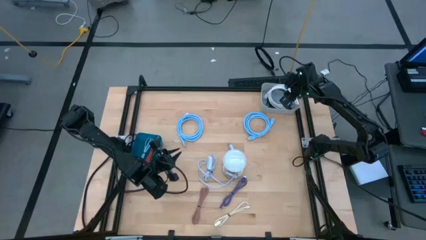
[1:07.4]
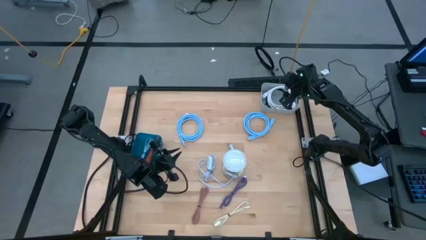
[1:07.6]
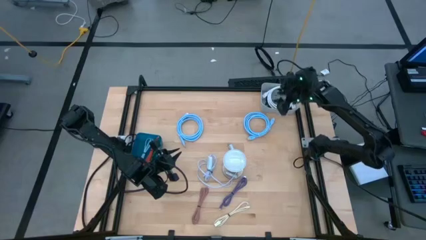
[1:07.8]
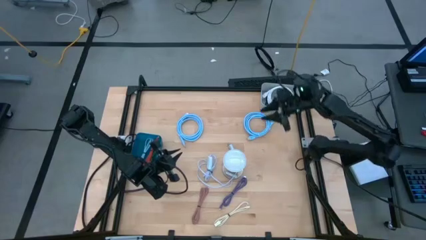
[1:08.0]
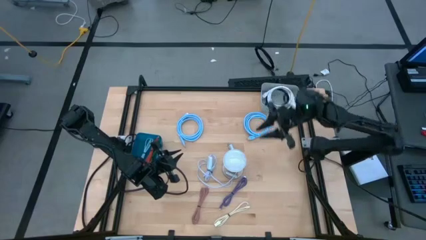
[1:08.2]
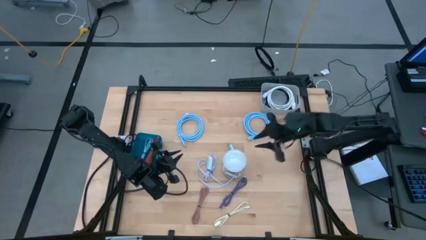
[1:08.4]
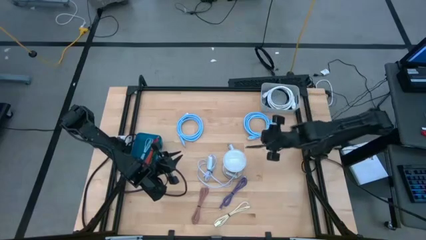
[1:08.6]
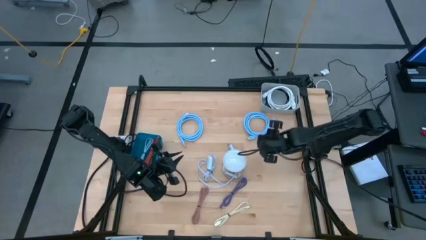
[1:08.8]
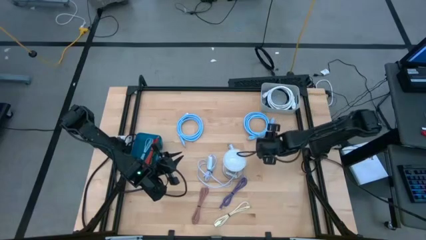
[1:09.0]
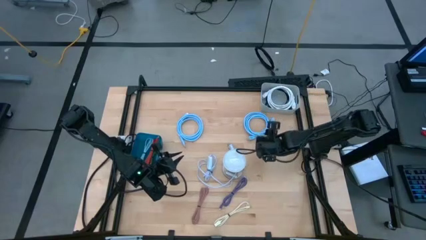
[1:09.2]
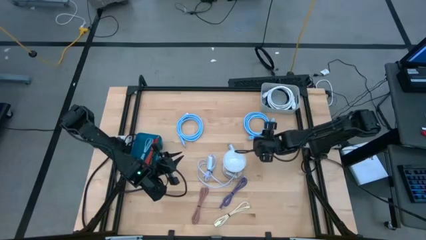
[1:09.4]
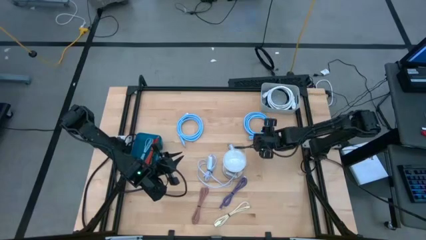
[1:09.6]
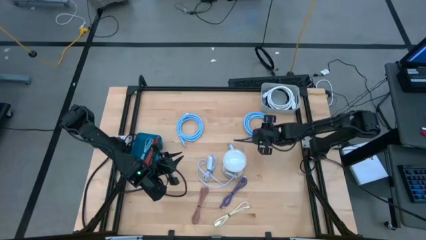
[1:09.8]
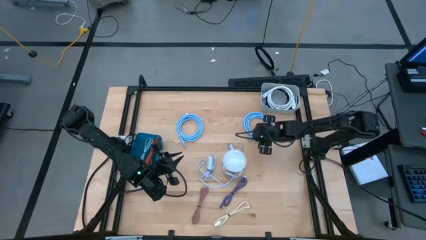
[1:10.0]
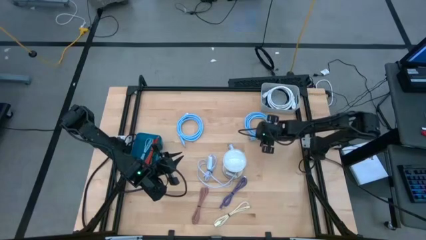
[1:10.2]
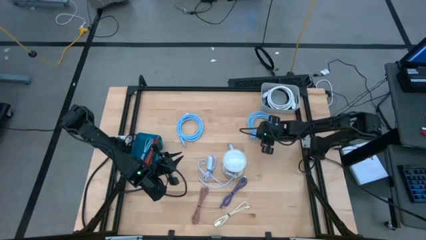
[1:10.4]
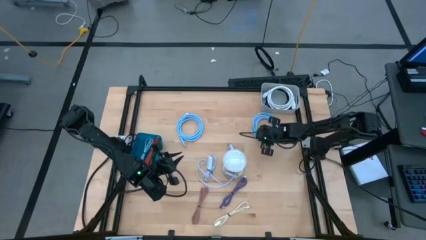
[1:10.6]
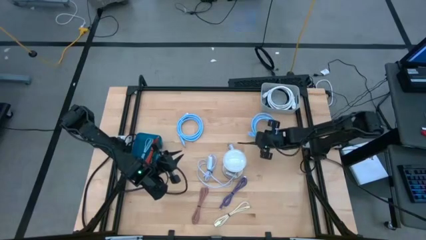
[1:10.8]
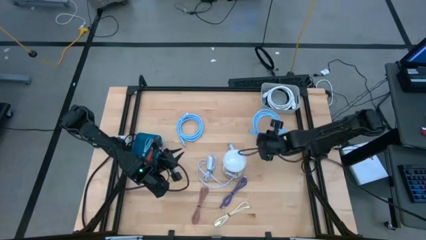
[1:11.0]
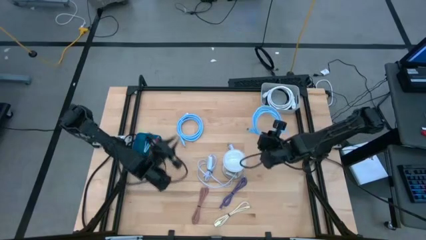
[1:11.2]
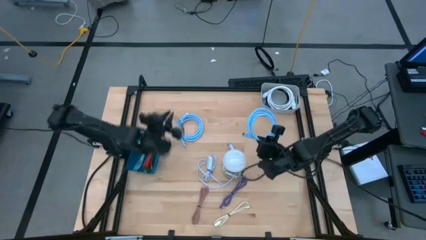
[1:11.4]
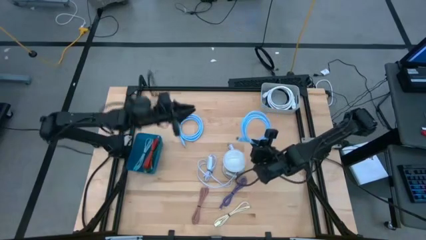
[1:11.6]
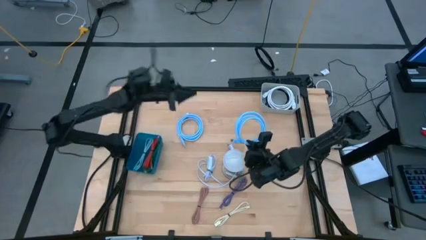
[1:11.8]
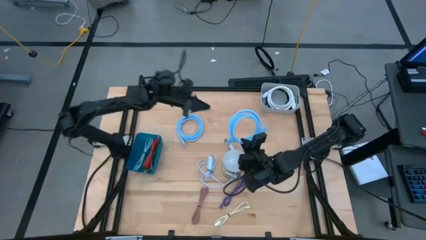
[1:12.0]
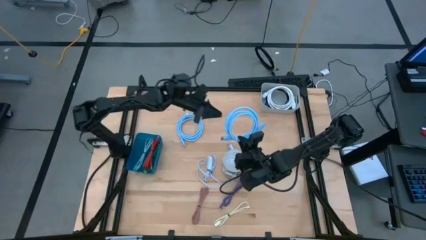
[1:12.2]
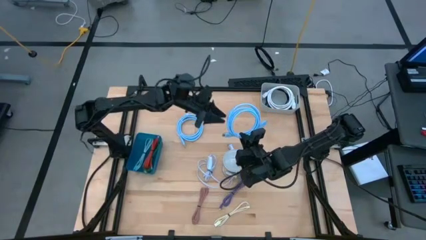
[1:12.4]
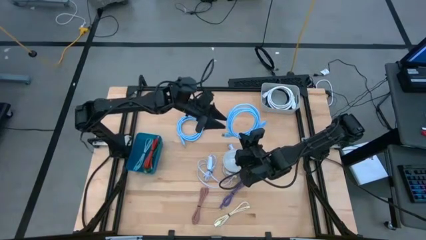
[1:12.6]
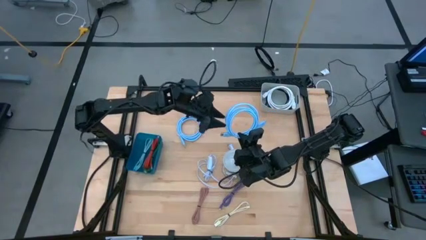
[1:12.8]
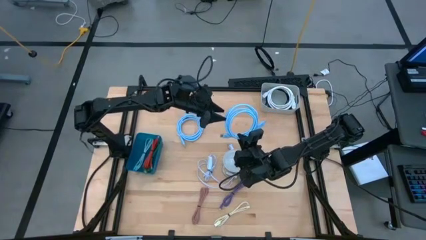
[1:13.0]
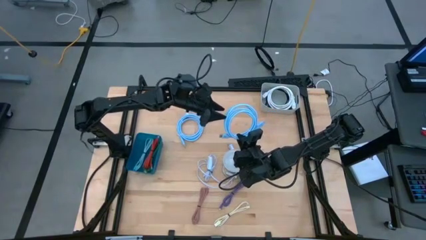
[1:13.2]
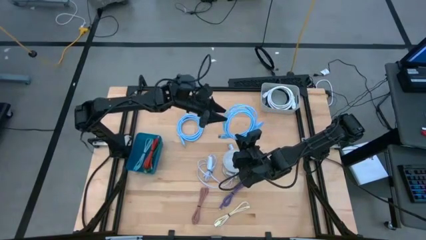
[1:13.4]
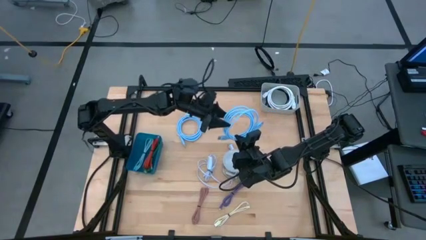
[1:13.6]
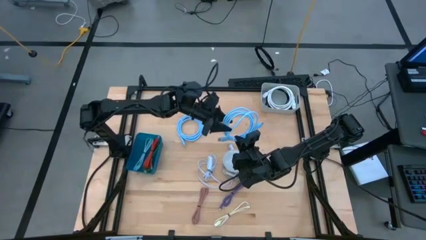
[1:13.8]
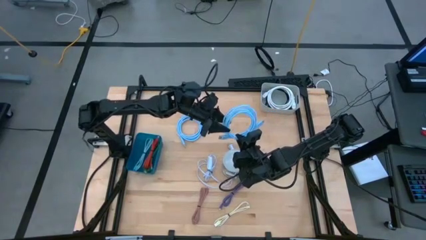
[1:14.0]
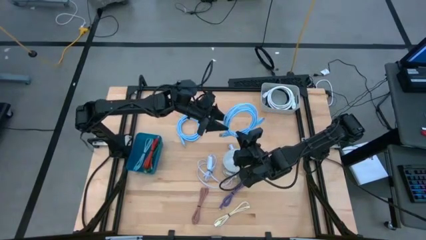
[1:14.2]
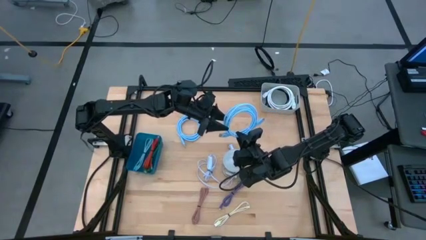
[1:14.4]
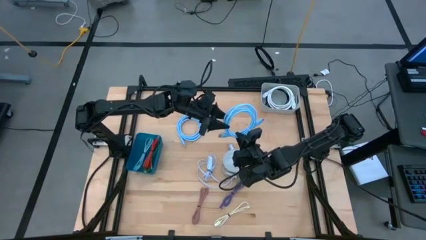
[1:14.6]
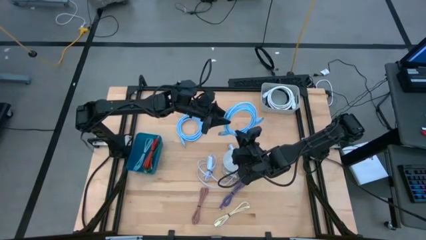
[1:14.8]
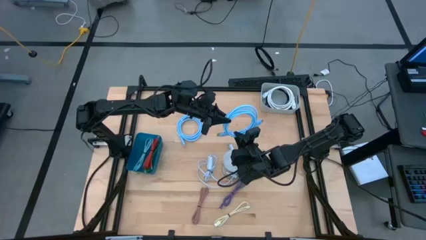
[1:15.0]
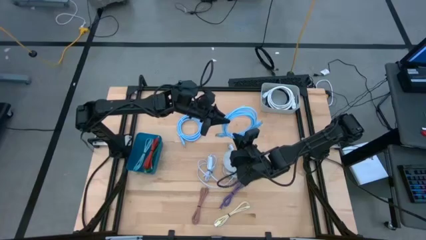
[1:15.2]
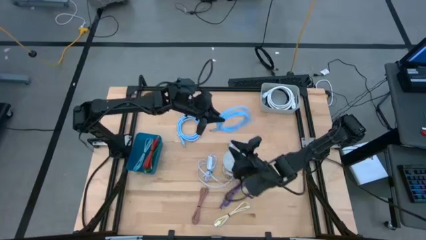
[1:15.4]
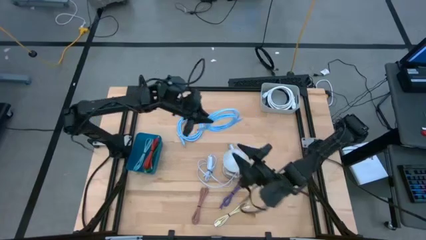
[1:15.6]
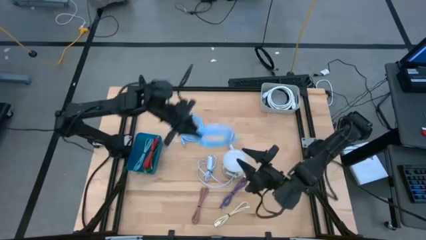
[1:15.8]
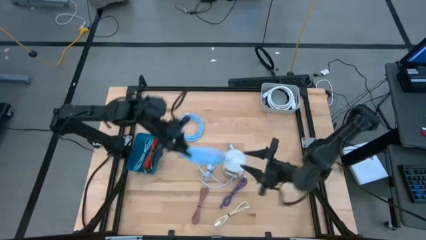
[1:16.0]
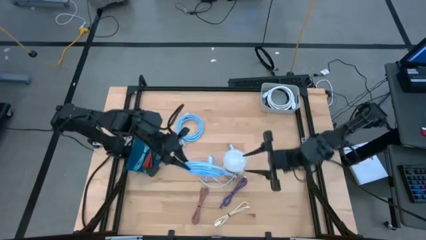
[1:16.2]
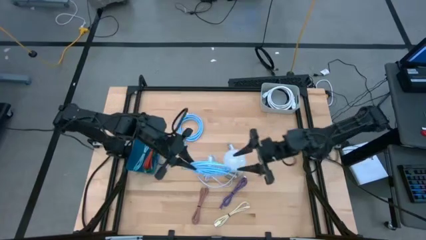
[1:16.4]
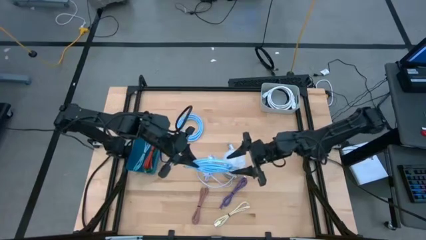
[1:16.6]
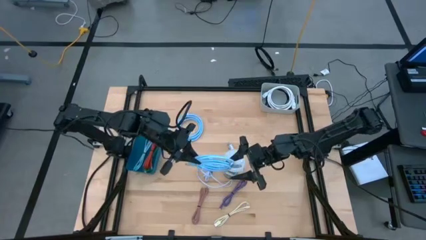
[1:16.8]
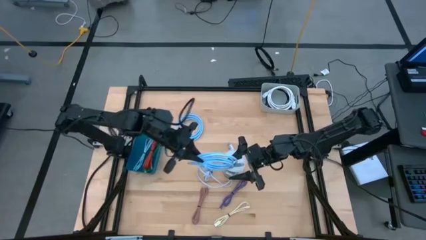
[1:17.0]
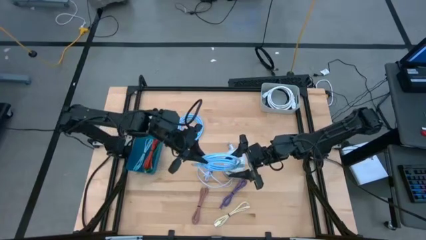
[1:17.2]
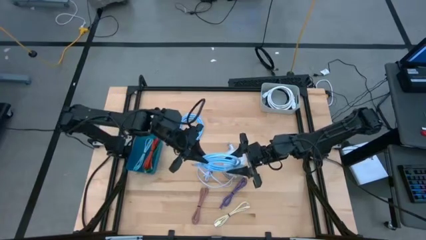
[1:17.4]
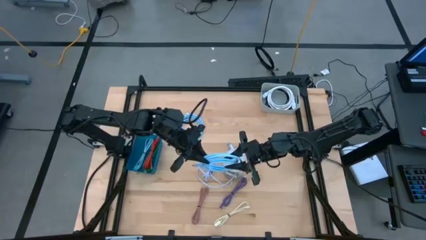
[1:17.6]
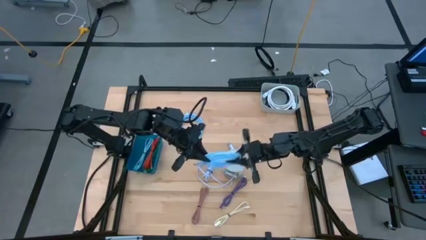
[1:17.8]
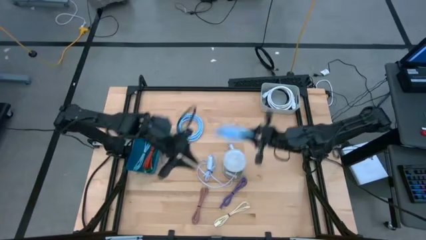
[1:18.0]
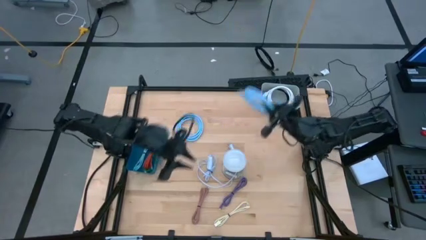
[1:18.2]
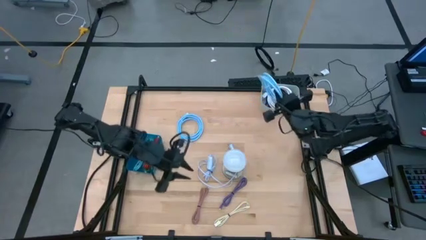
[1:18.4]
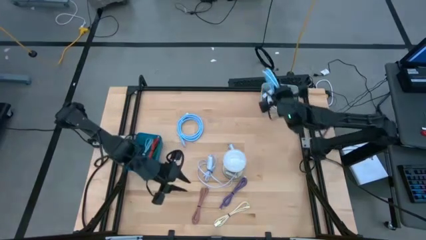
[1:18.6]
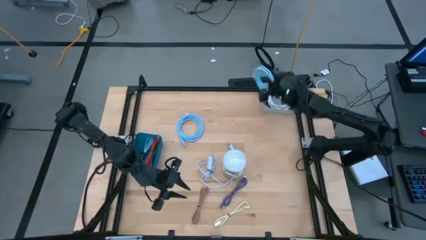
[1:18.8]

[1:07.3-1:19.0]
Task: Pick & Place USB Port
Put the right blue HDMI cable into the gray bin

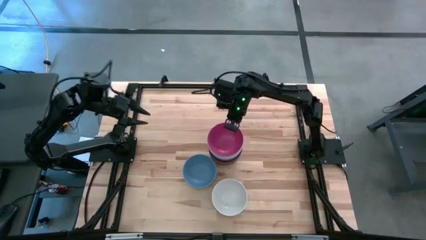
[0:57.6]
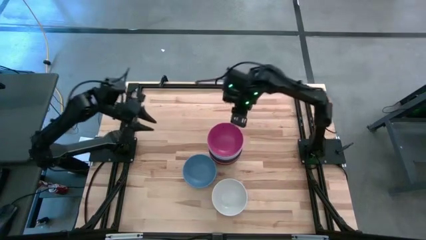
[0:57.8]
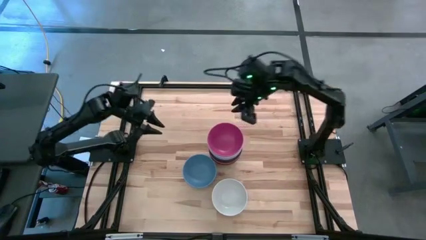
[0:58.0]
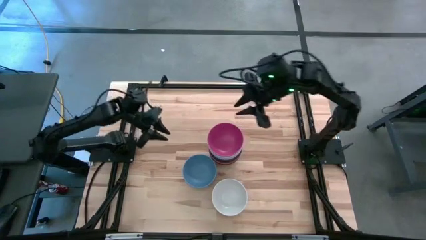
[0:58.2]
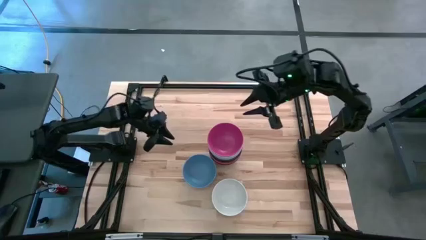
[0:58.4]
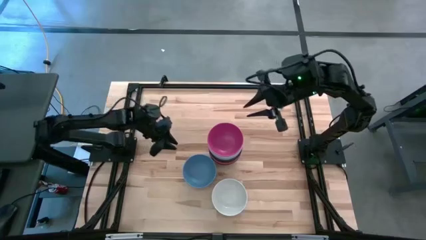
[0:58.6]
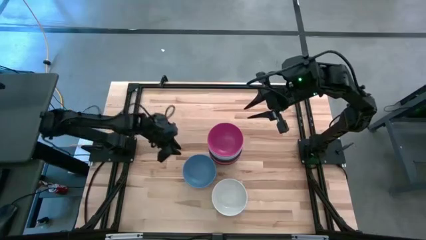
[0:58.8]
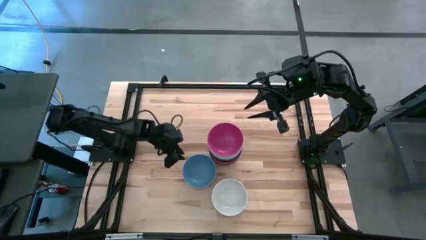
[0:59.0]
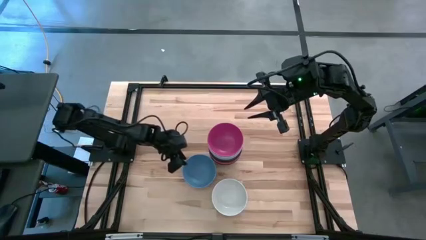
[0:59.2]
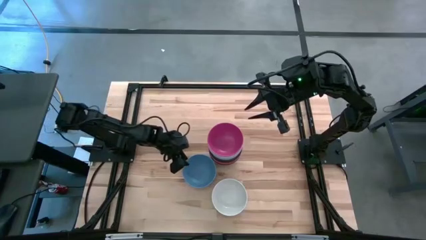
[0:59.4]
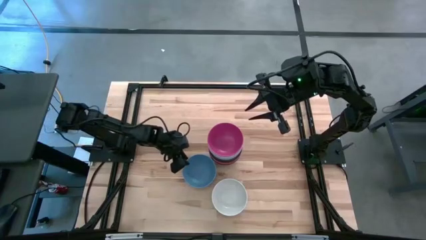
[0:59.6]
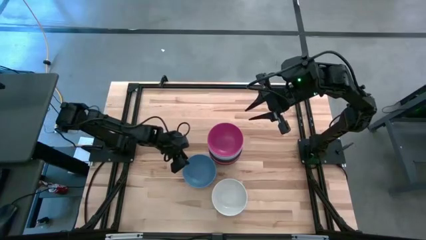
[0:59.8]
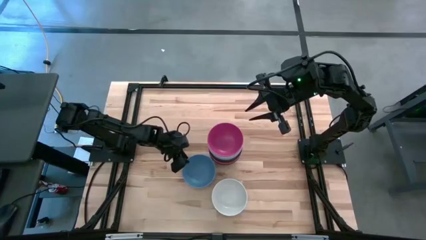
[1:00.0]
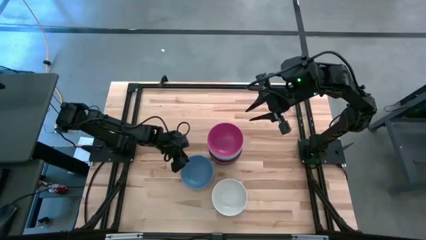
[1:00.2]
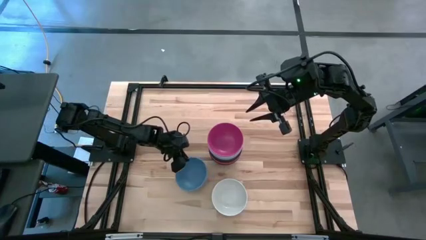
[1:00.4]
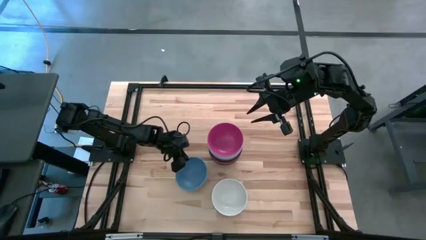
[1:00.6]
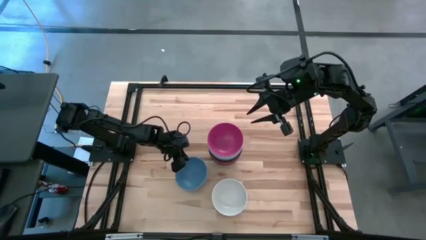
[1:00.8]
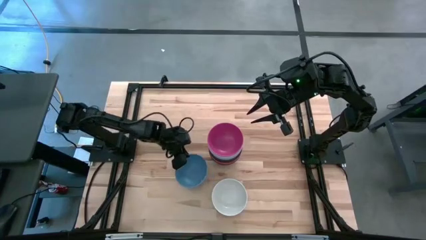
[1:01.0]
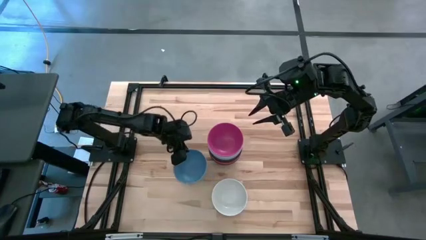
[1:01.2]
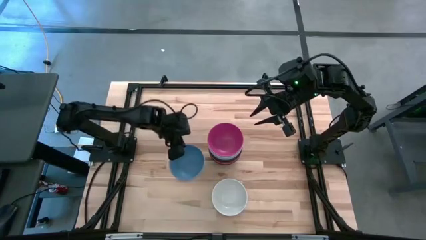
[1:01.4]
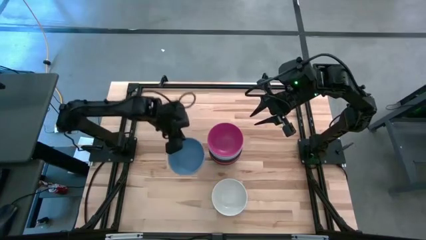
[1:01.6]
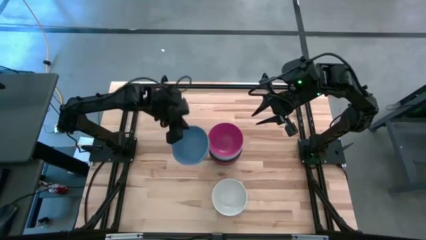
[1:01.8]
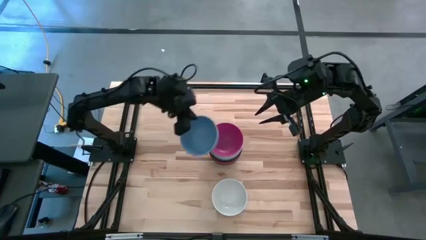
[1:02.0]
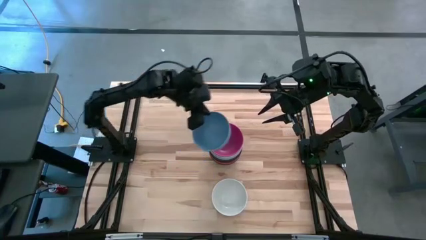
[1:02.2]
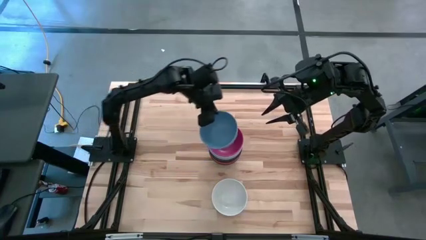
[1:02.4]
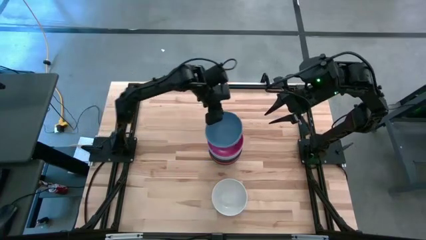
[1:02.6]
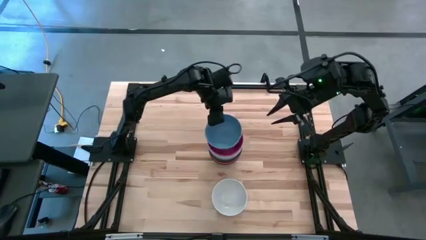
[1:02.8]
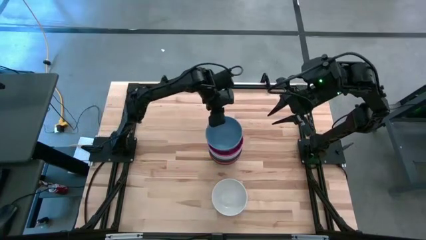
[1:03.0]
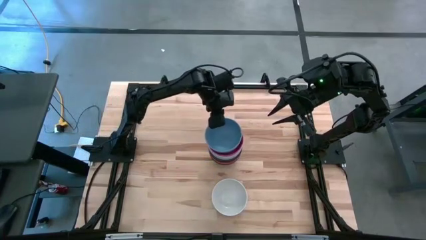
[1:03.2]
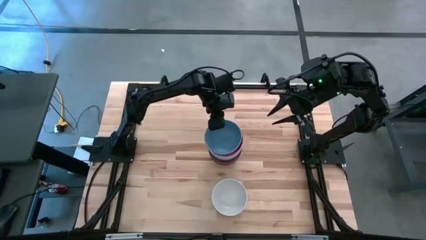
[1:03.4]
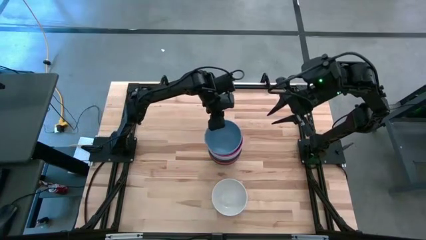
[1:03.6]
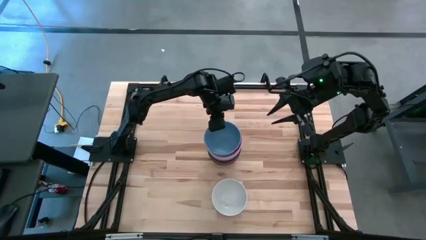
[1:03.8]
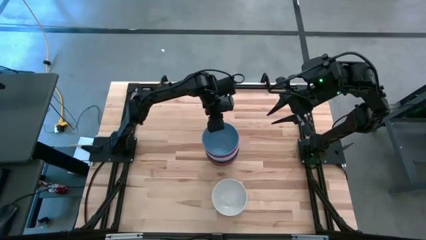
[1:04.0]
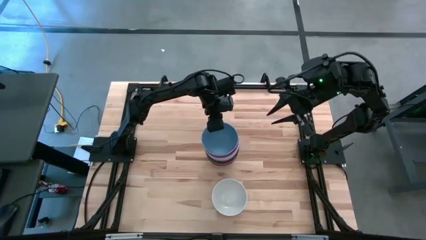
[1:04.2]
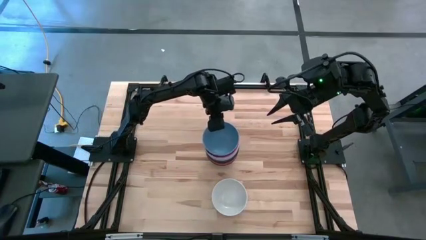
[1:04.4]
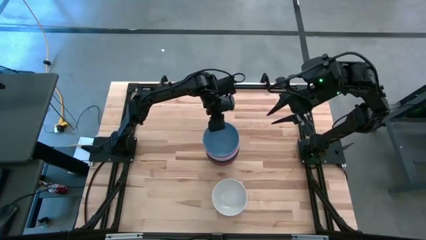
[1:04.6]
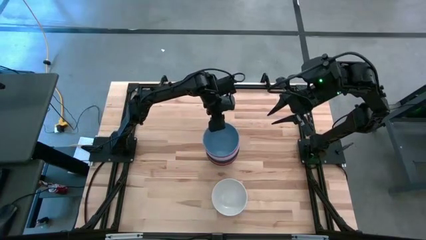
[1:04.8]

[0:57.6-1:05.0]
Task: Nest bowls inside each other
Stack the blue bowl on the pink bowl
